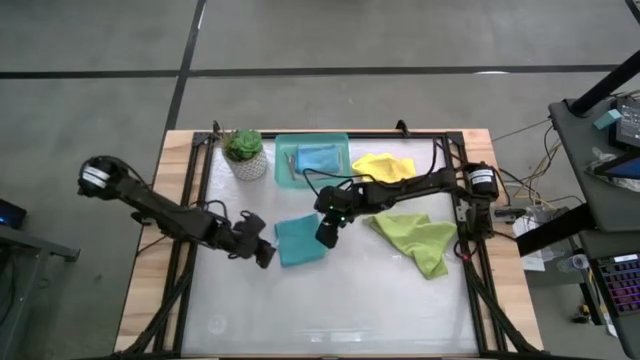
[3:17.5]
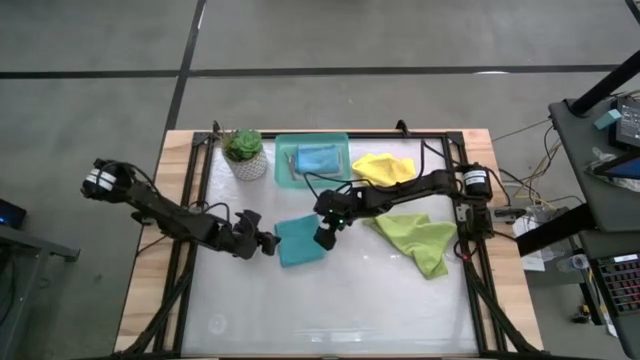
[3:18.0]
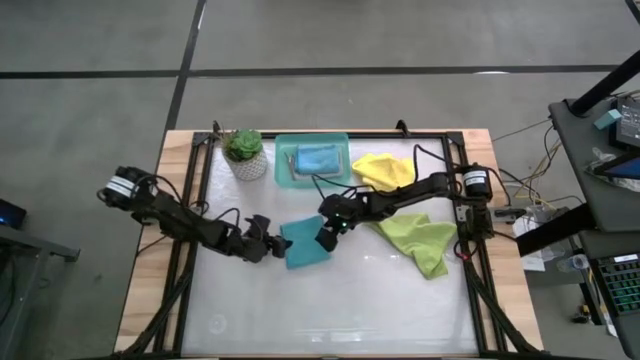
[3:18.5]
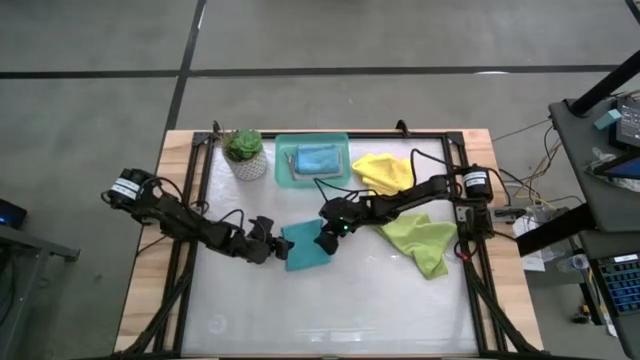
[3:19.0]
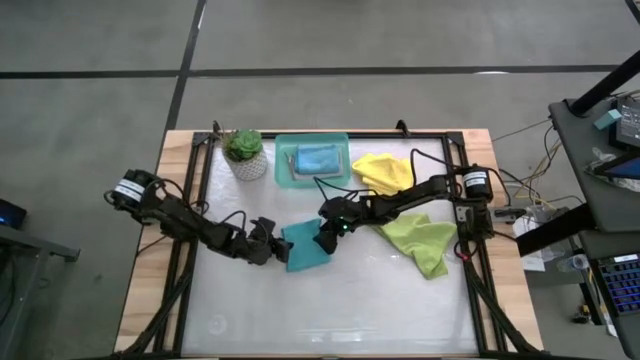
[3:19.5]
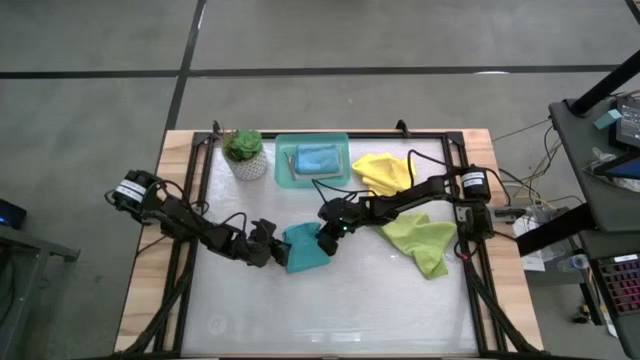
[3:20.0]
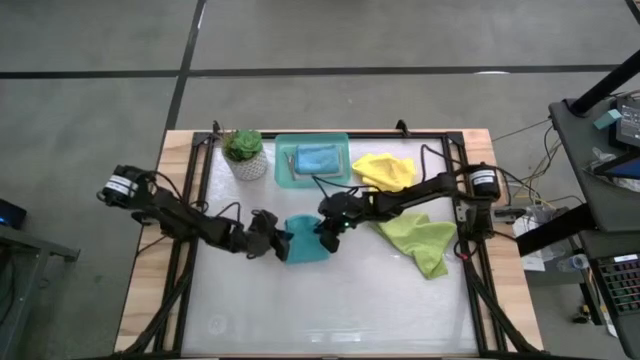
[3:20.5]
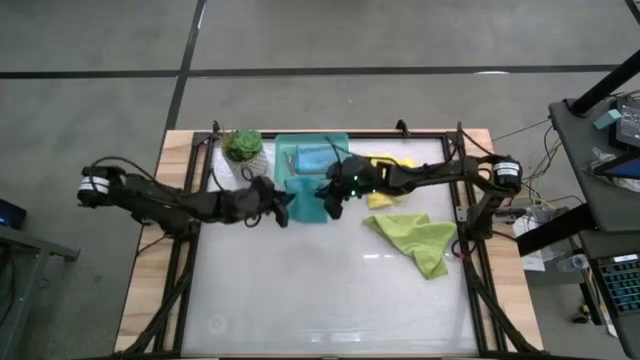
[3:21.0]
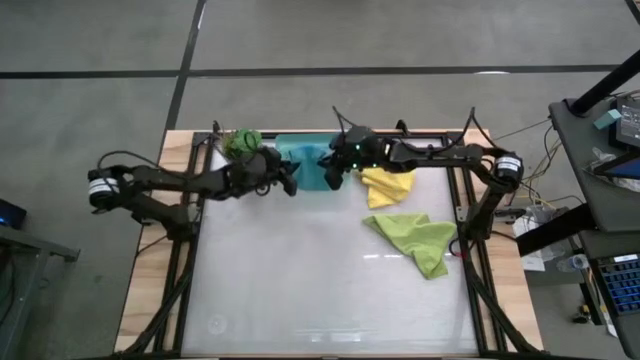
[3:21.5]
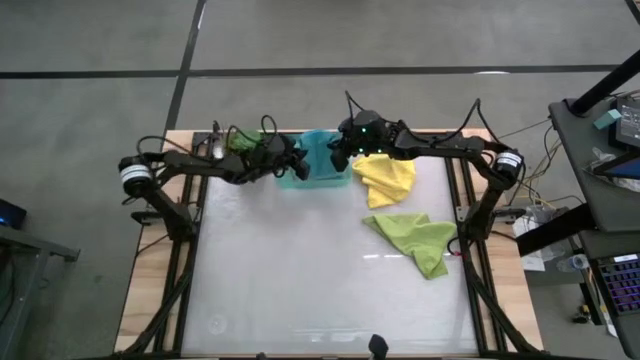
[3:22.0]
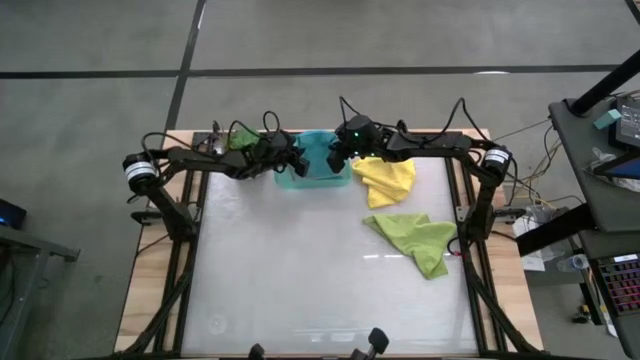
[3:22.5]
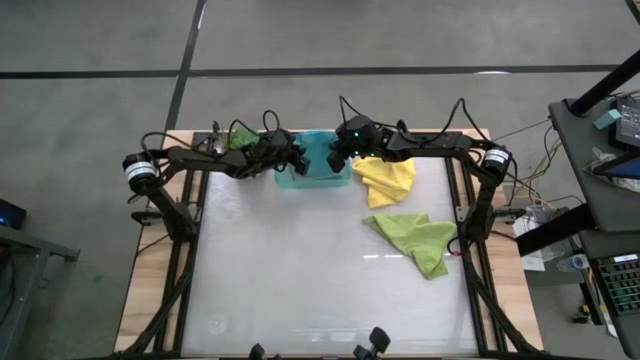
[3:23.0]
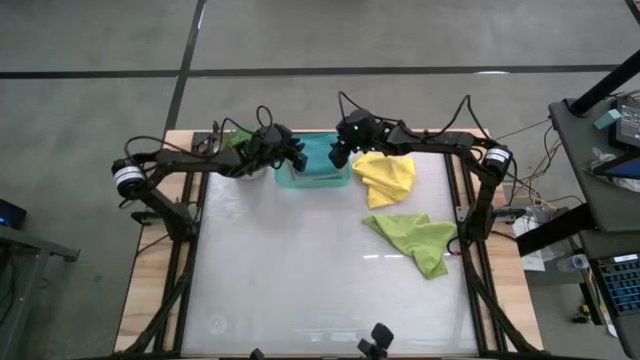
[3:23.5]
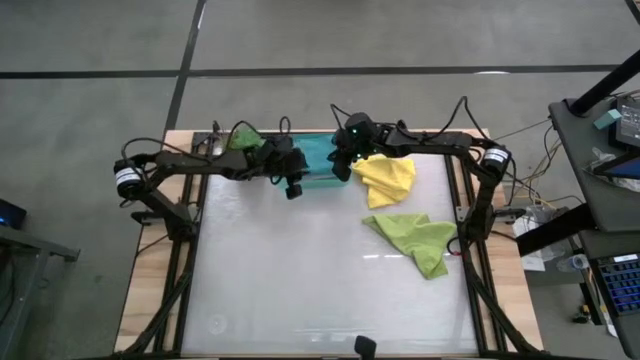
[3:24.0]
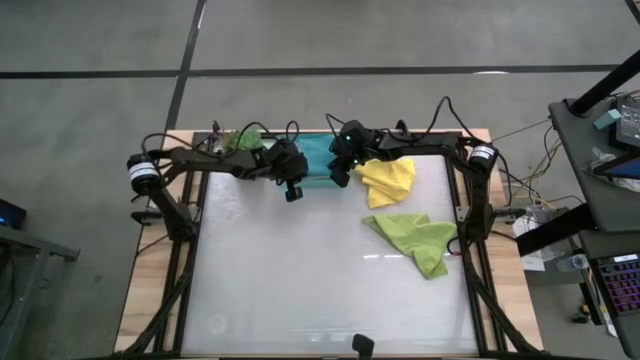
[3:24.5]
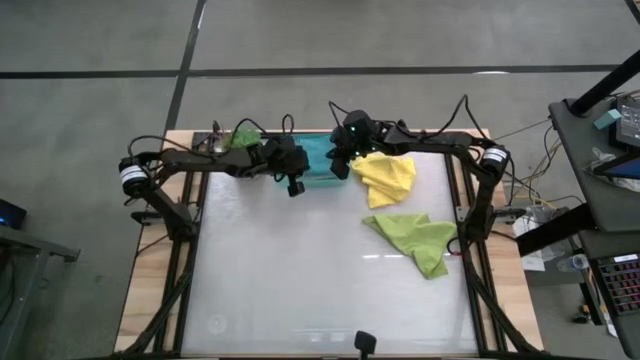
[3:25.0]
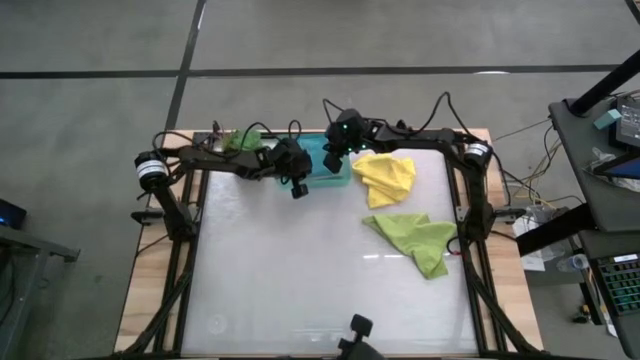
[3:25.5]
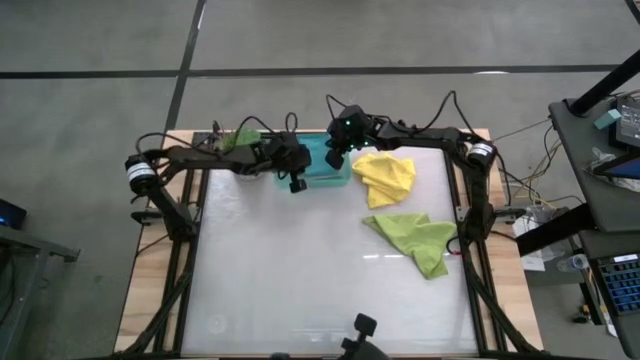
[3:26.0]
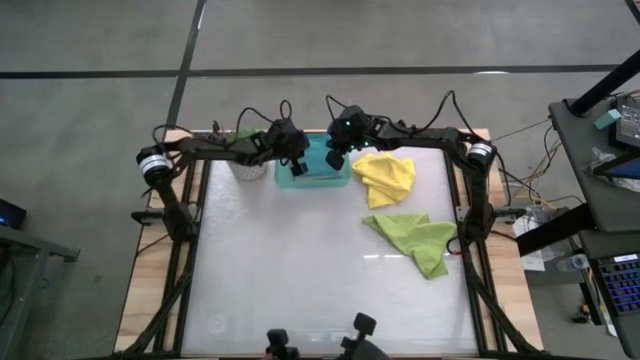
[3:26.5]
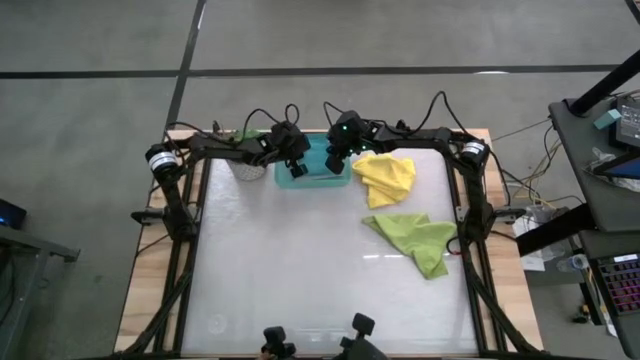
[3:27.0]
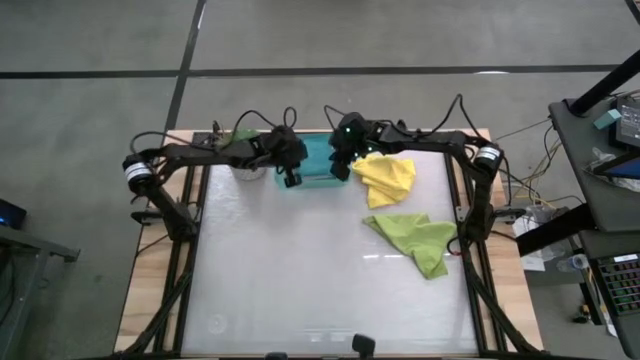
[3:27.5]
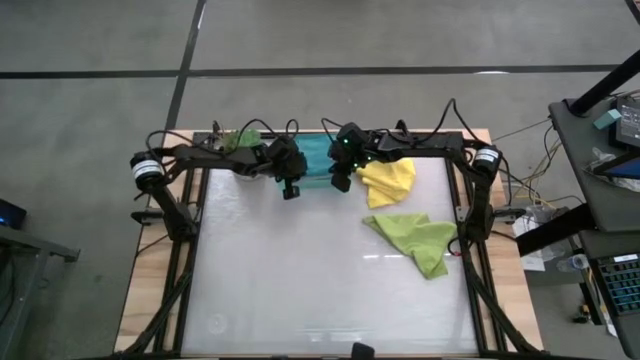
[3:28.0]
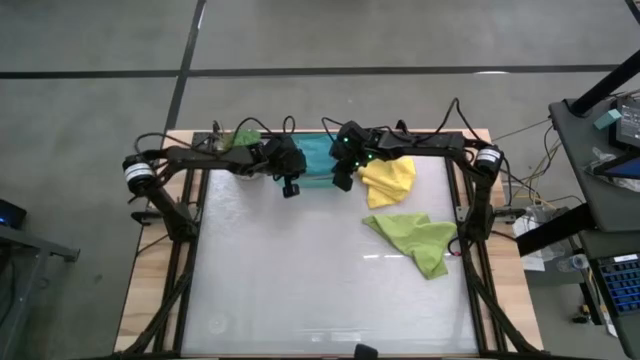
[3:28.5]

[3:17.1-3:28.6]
Task: Fold microfiber towels
Put the light blue microfiber cloth into the green bin

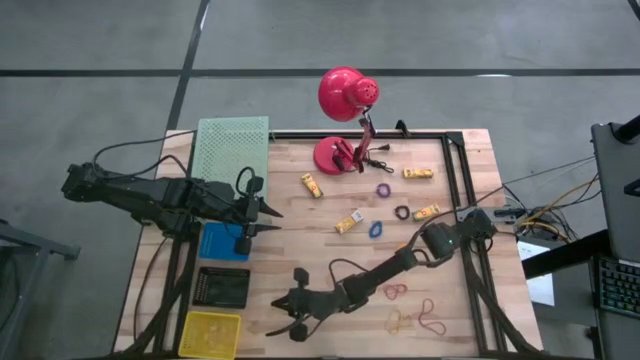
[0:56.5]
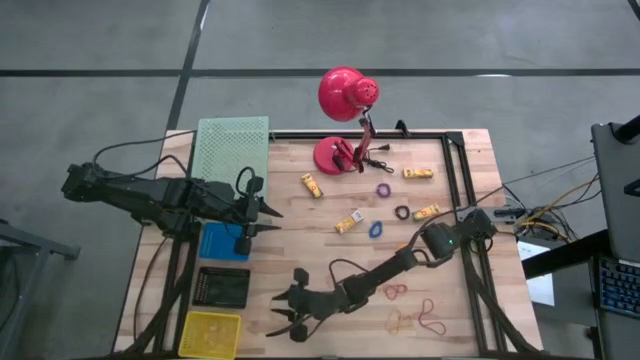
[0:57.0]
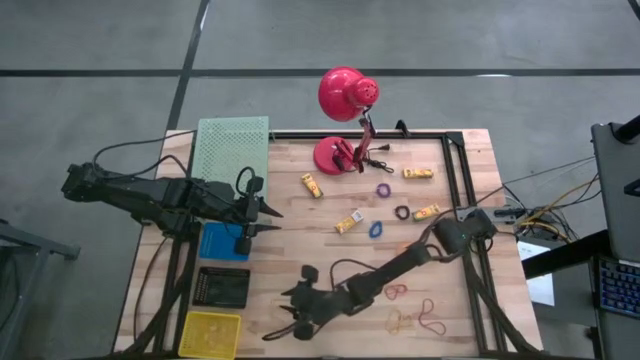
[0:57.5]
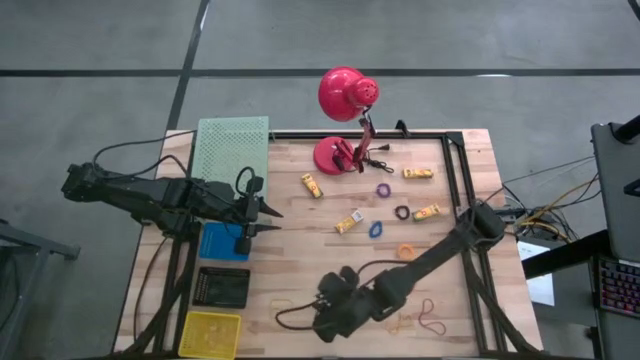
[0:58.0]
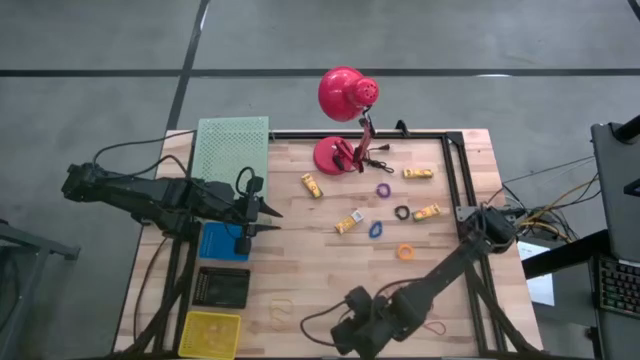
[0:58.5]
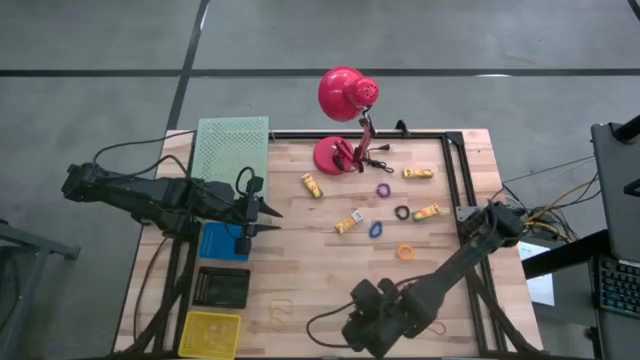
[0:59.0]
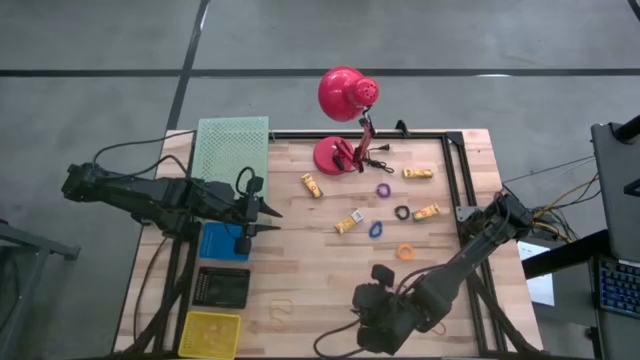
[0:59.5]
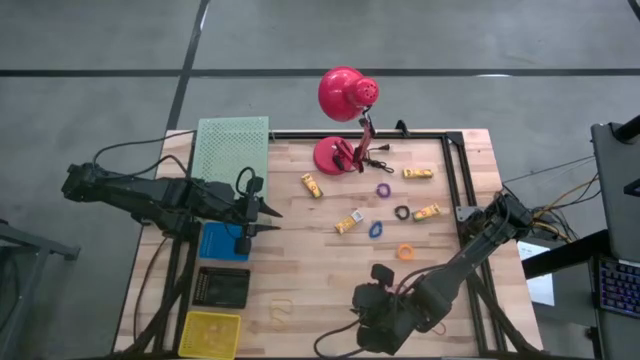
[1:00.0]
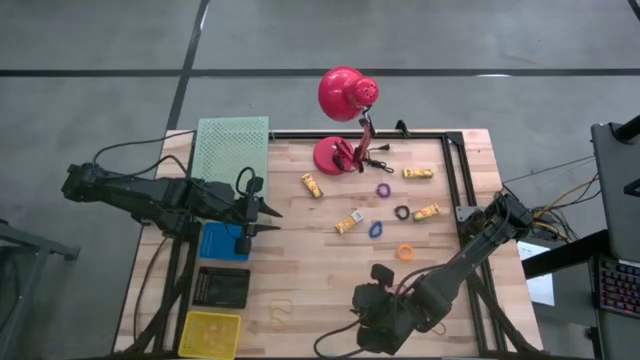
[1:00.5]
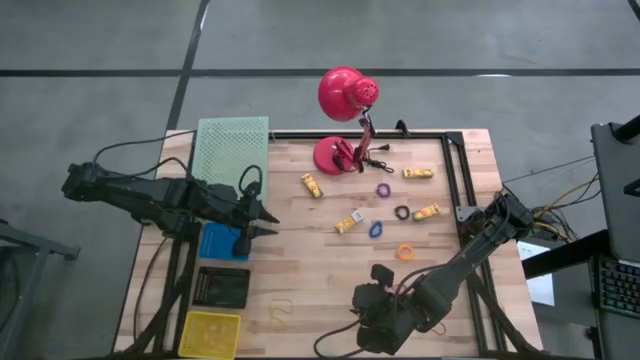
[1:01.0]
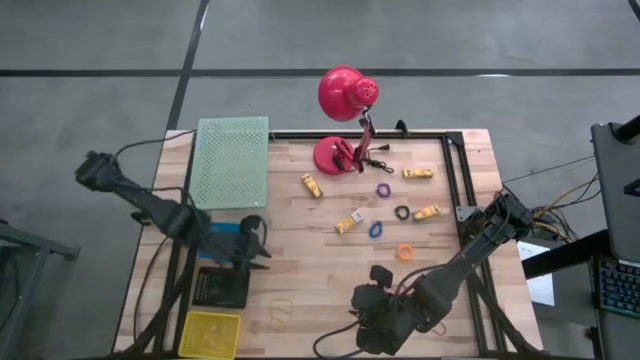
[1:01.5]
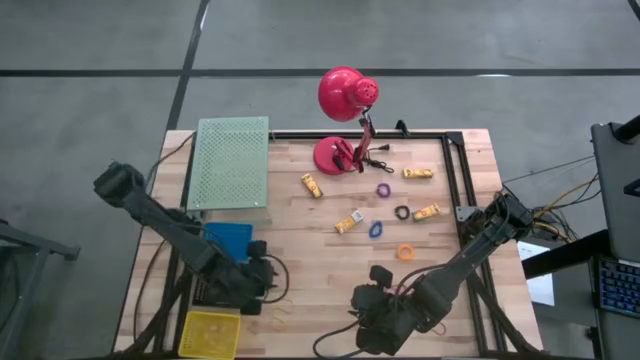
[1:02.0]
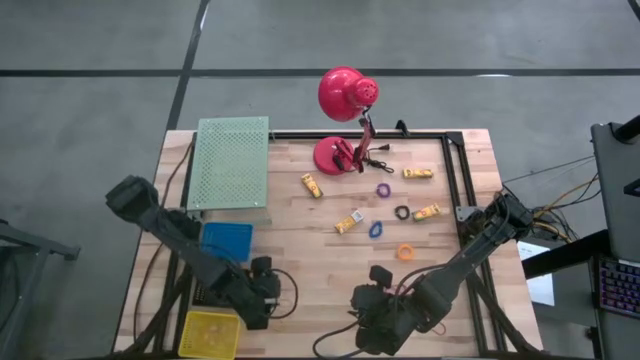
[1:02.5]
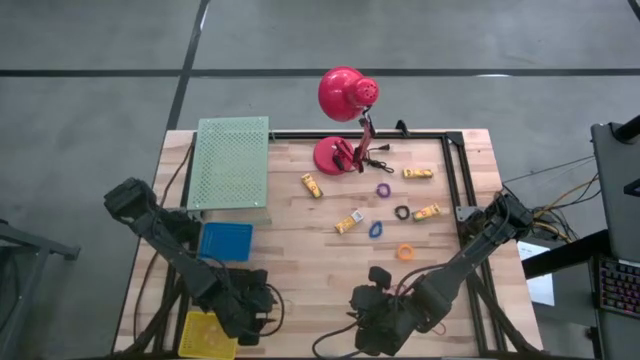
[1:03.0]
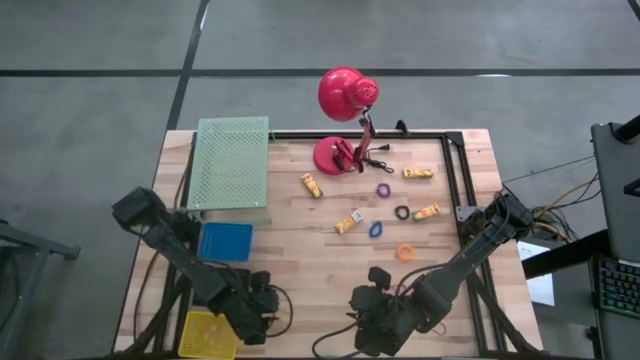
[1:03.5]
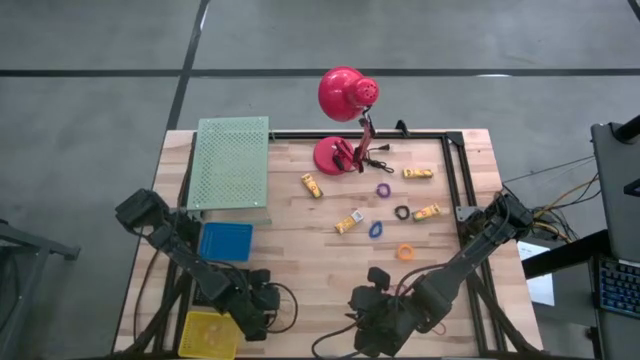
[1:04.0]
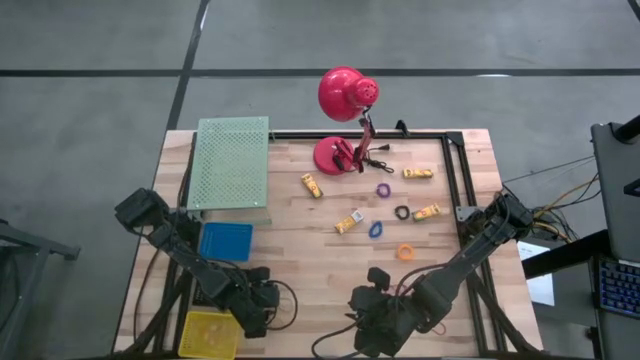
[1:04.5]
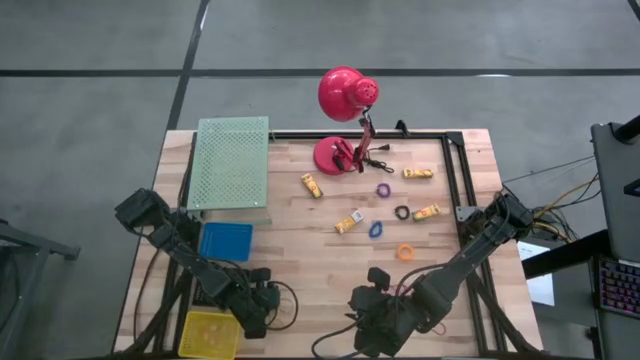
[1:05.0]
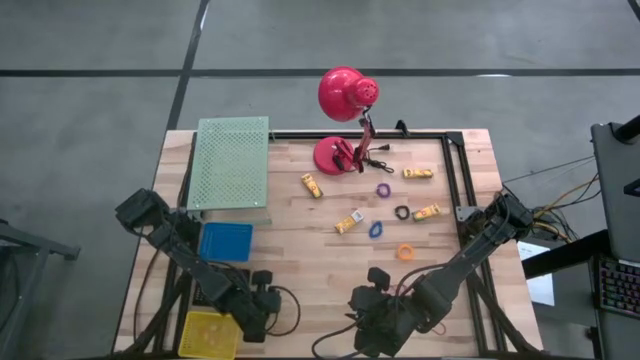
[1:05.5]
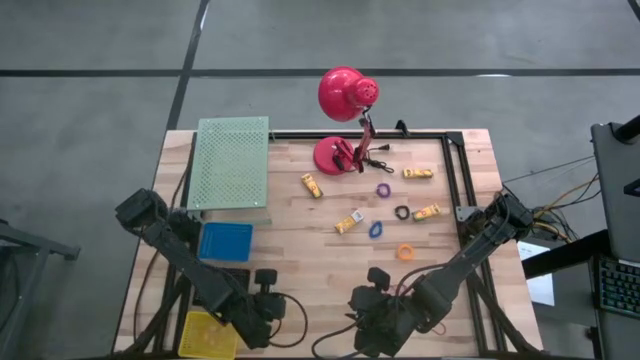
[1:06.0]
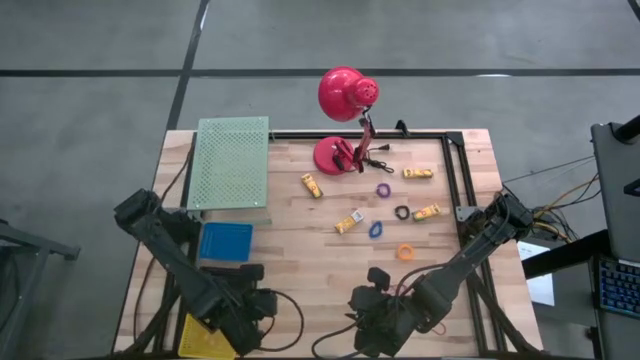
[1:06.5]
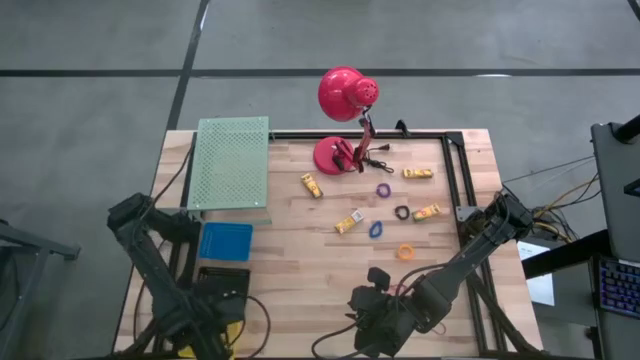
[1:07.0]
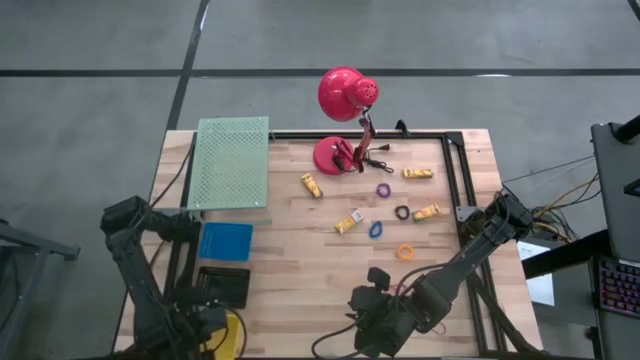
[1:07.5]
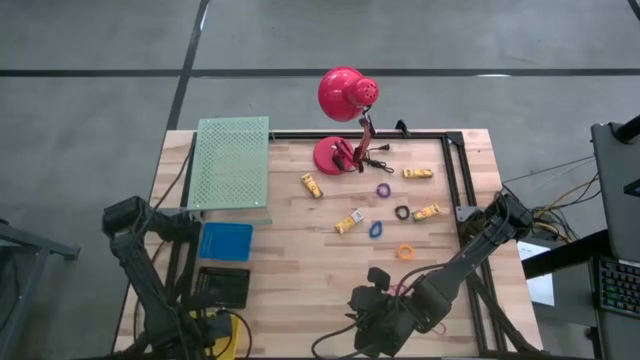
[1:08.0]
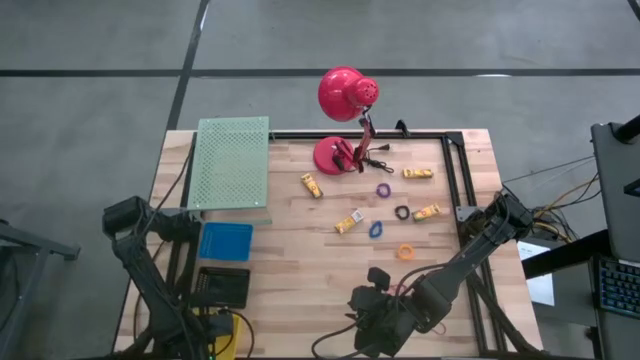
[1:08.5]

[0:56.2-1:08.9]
Task: Pick & Place Office Desk Supplies
Put the yellow rubber band into the yellow bin
